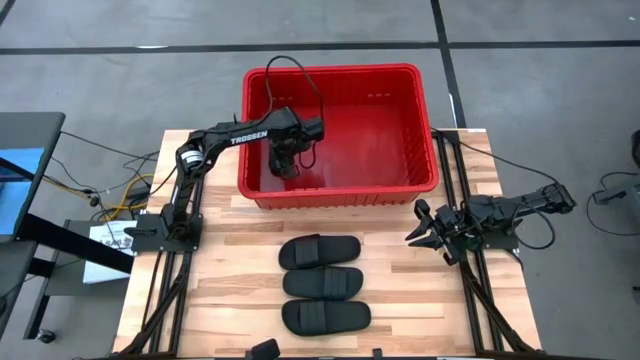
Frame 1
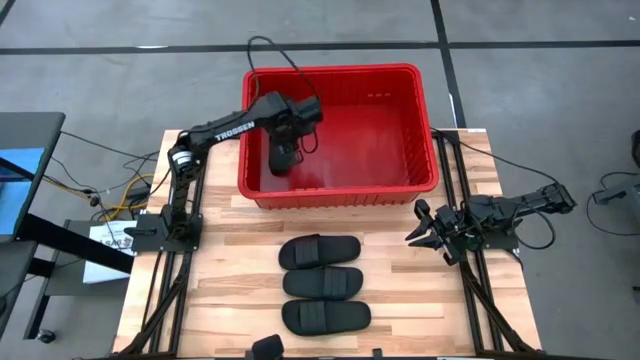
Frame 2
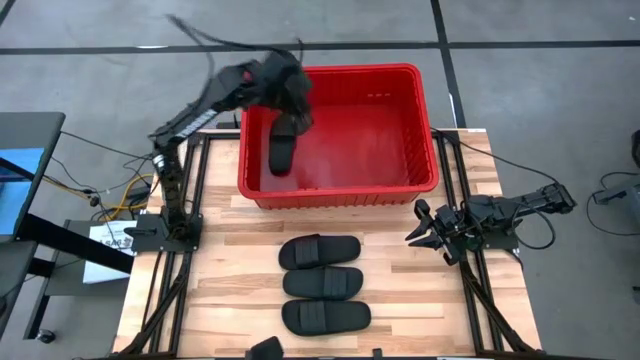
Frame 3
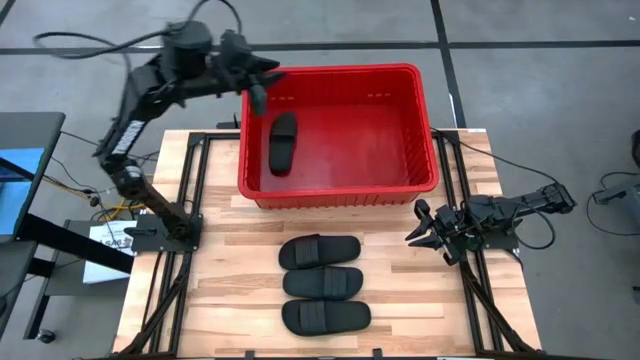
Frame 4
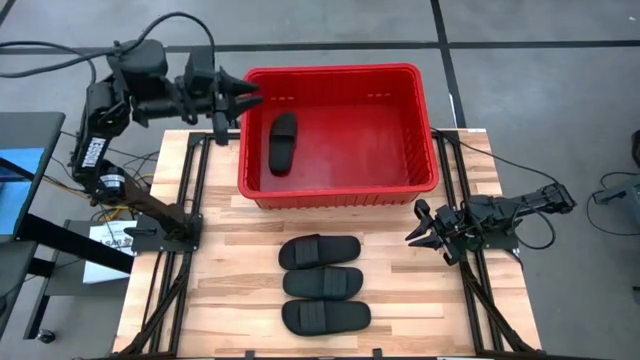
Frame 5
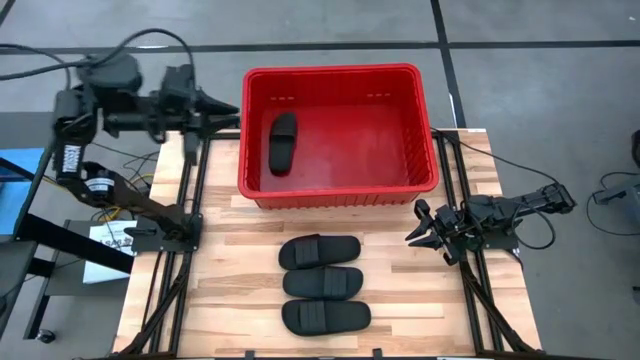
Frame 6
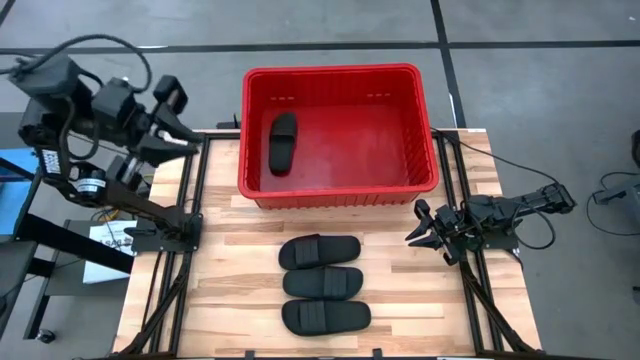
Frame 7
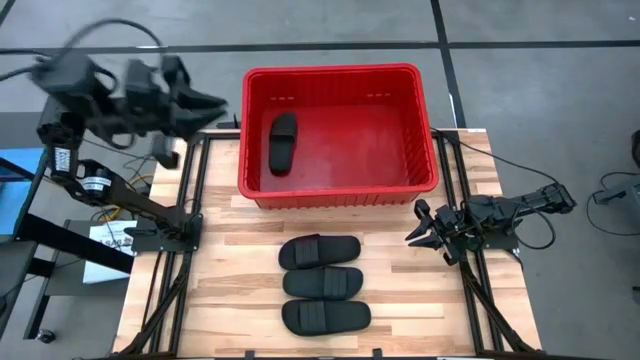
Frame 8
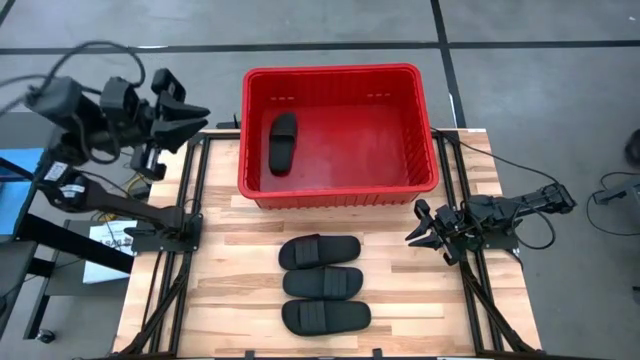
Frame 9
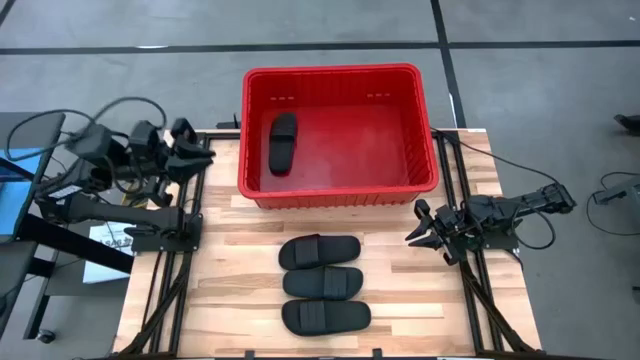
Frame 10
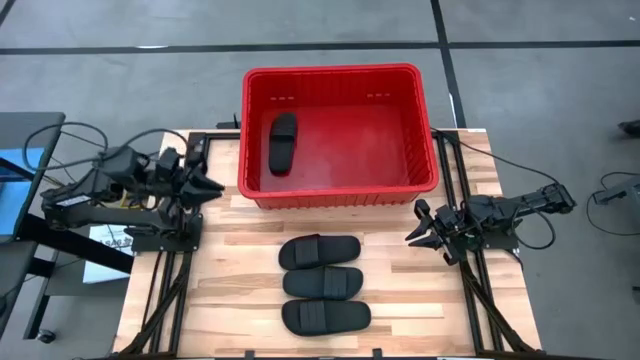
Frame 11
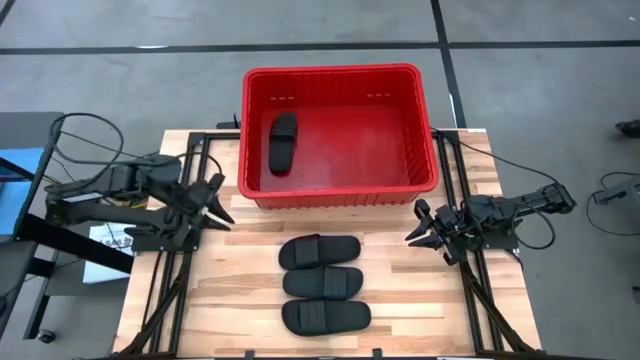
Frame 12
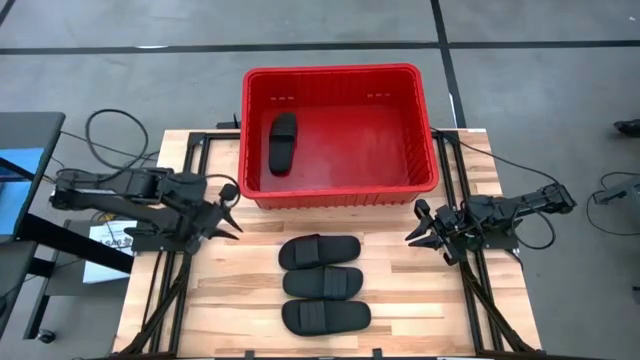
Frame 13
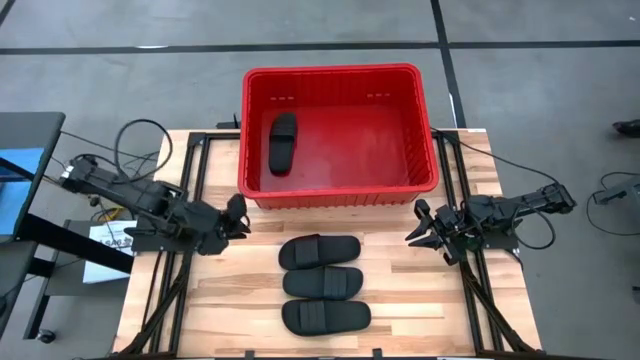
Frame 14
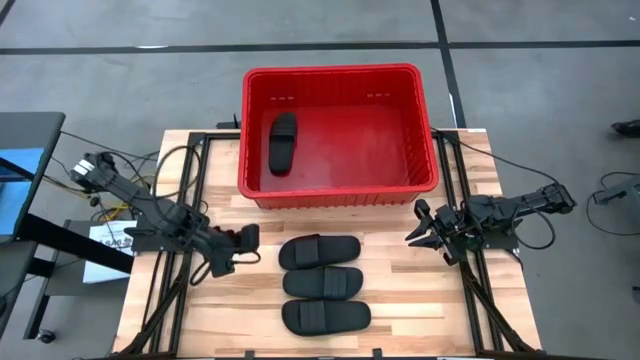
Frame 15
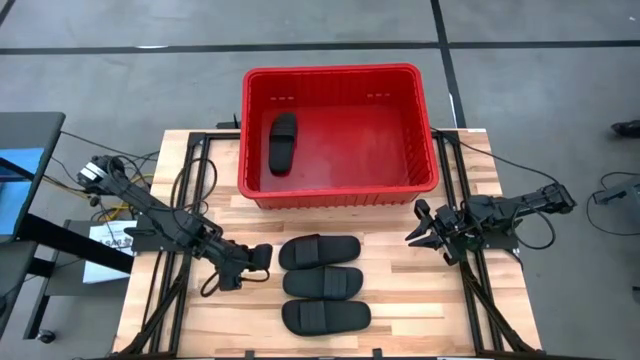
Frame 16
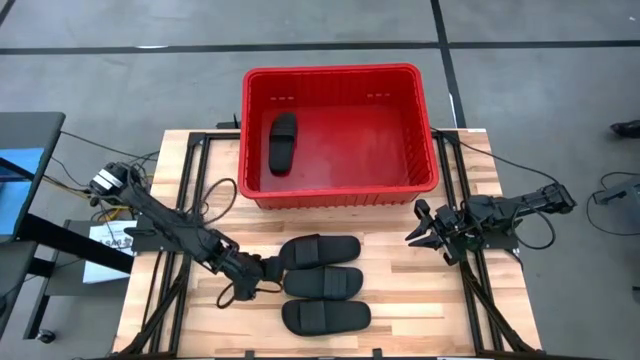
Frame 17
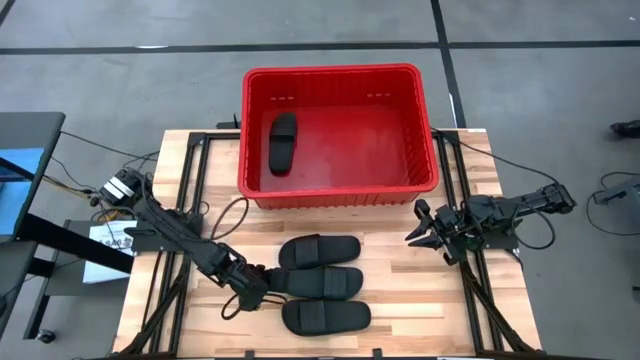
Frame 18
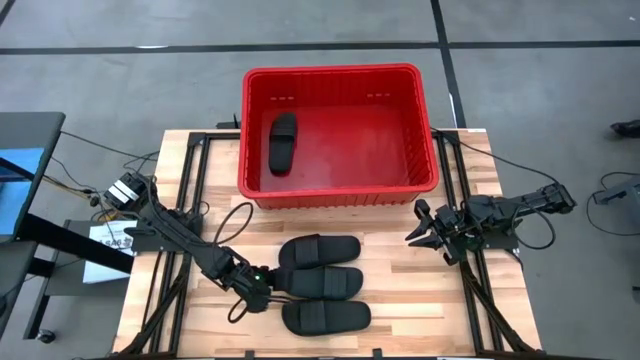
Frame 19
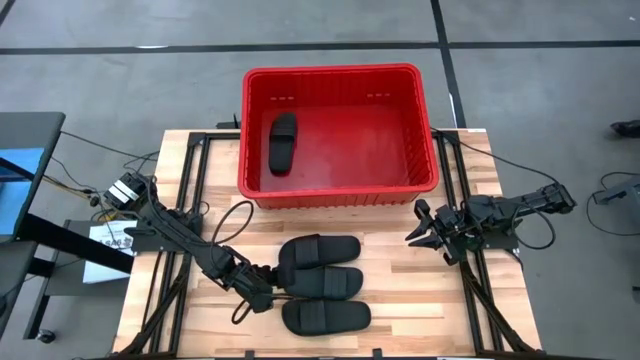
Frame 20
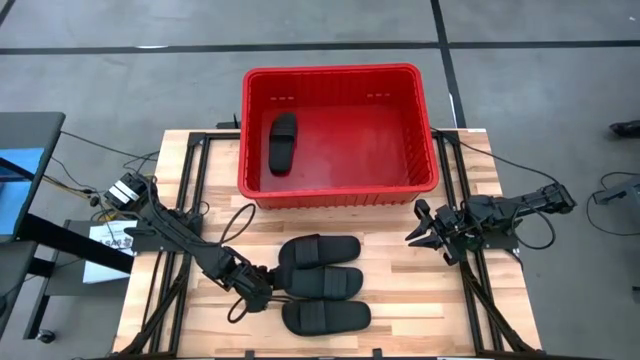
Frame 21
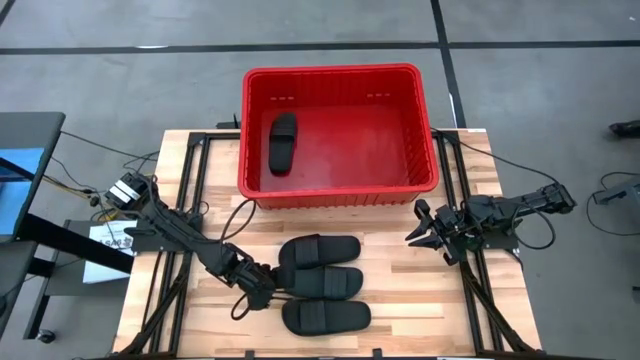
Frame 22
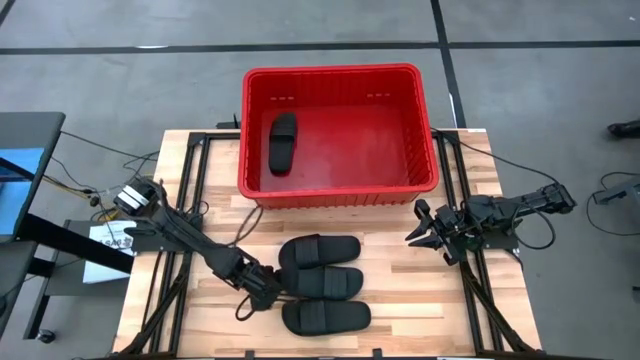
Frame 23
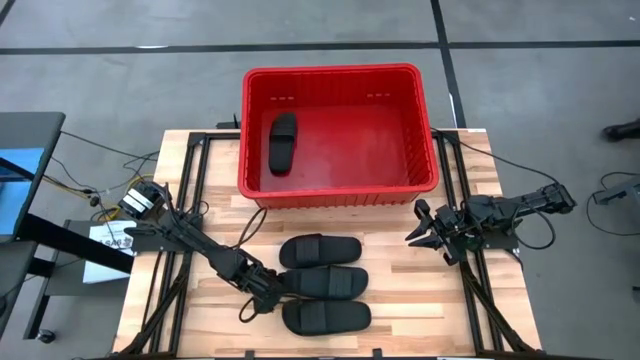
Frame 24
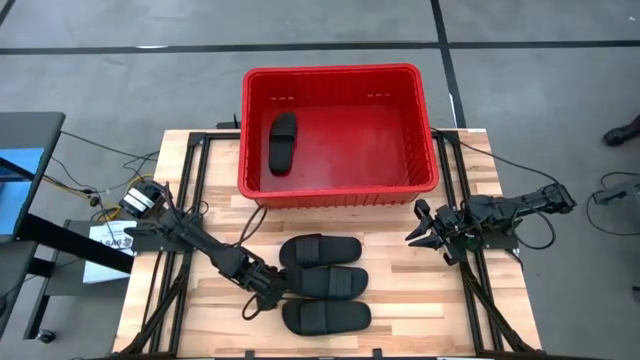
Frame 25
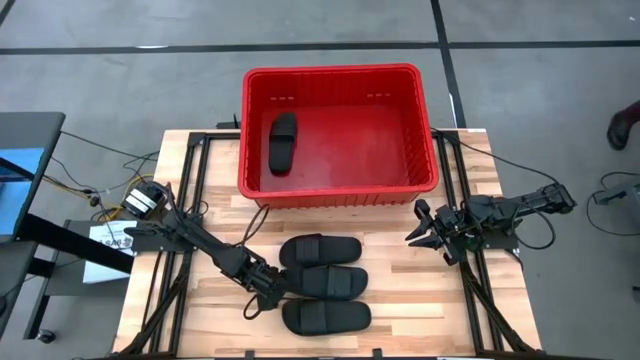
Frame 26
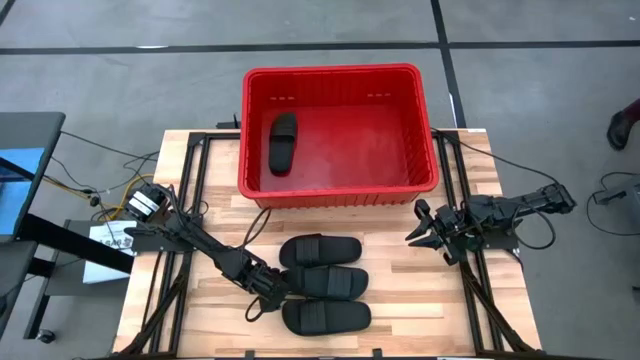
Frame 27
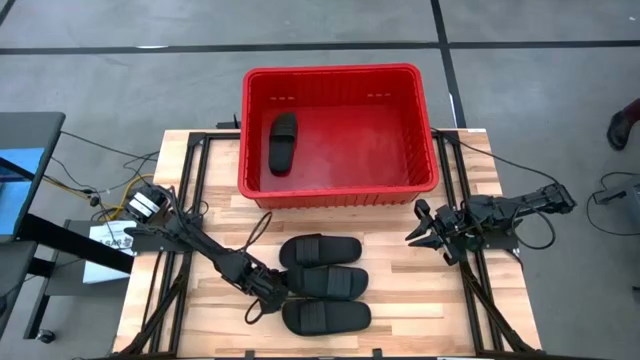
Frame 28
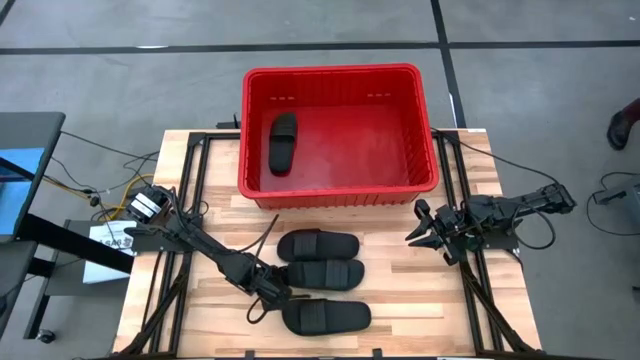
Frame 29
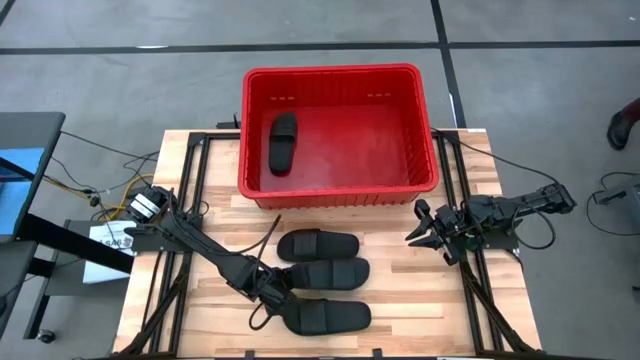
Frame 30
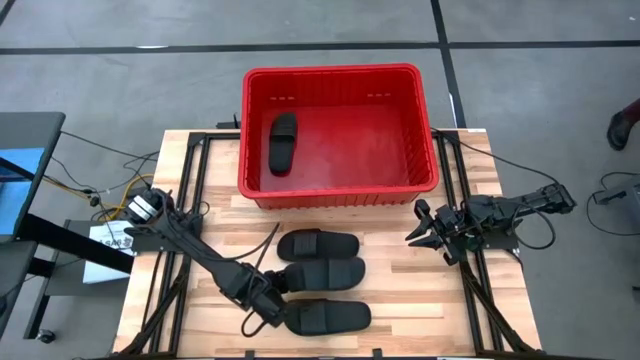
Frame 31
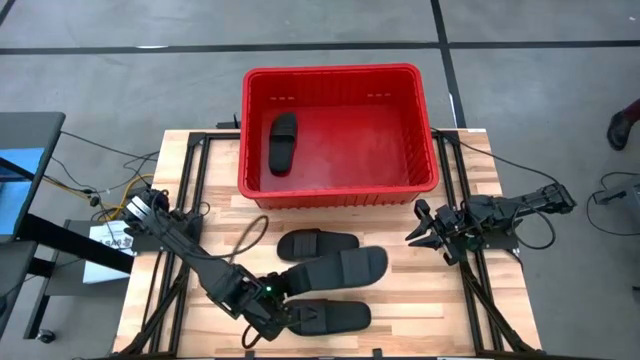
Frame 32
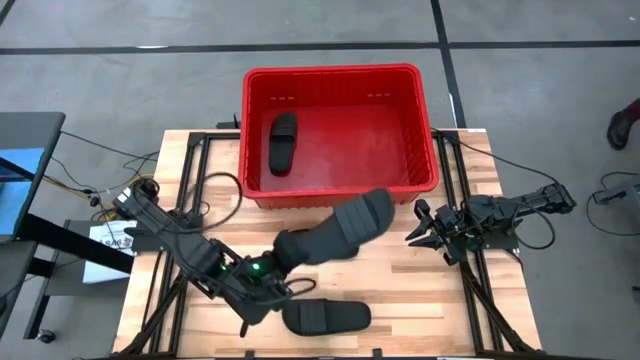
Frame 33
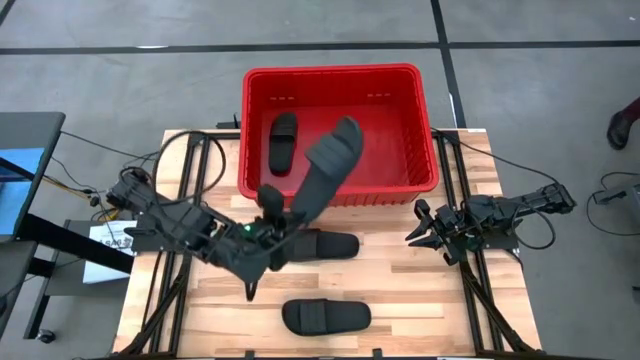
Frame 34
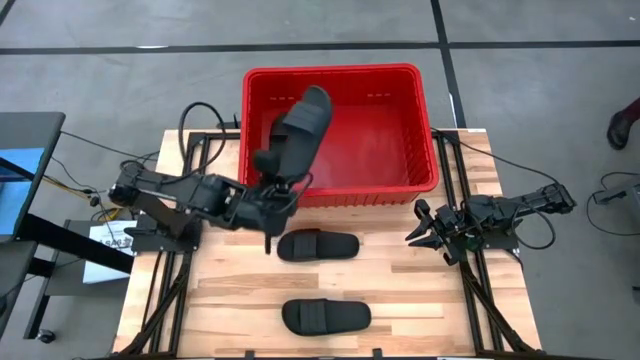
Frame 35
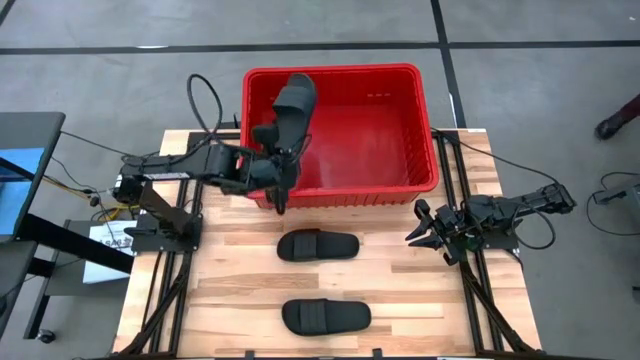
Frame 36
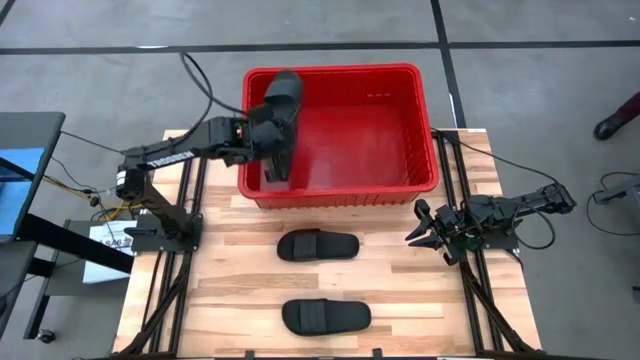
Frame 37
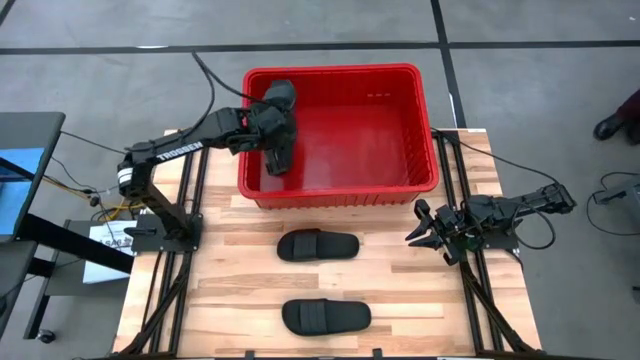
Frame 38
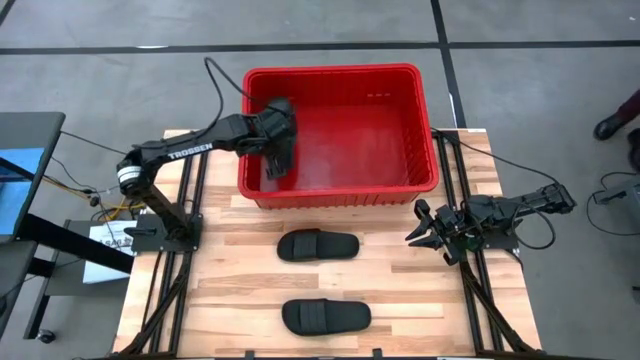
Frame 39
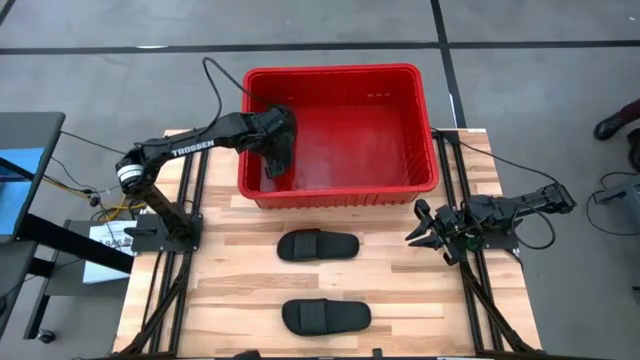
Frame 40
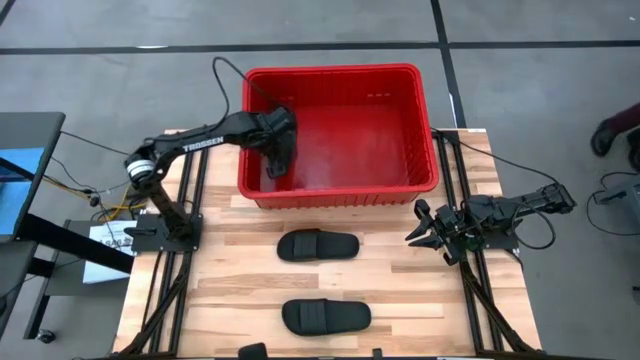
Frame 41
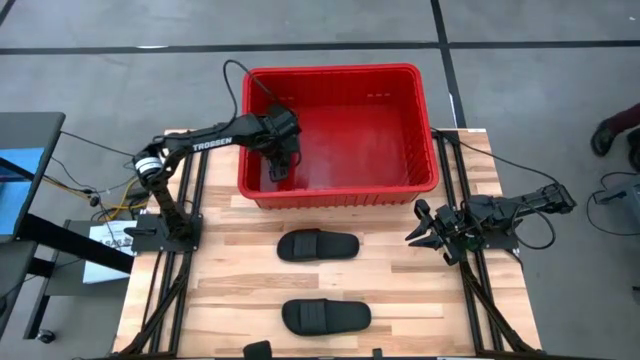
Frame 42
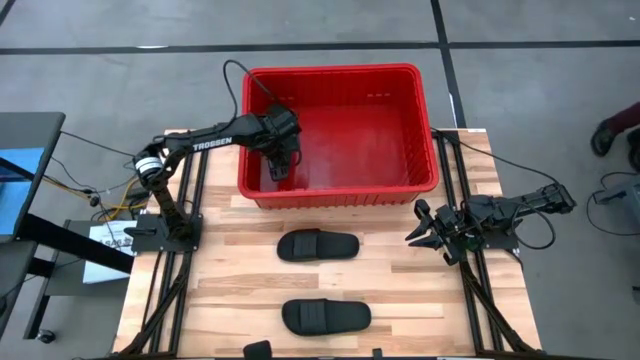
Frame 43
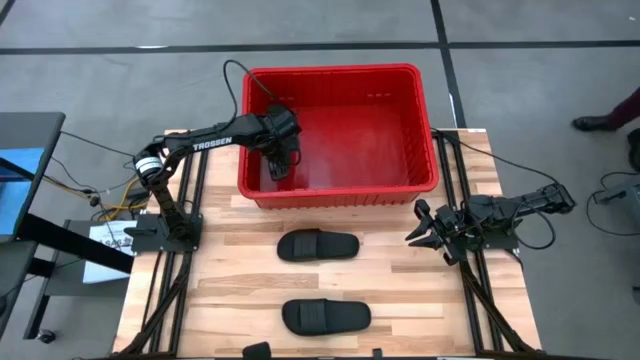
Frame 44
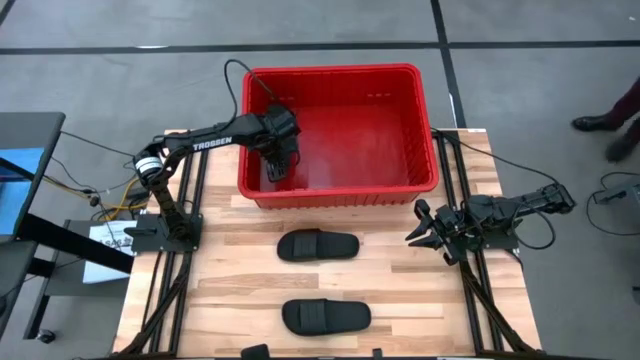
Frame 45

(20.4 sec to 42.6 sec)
Task: Pick and place slides into bin
Put the black slipper into the red bin
